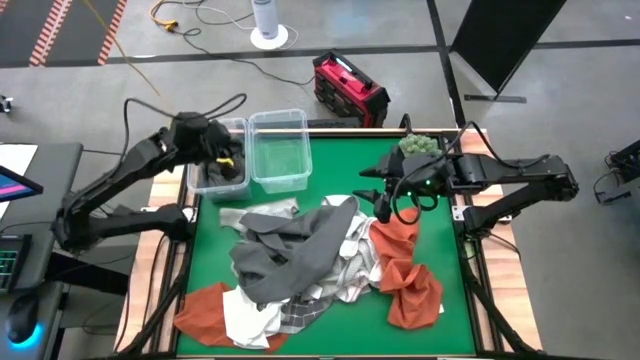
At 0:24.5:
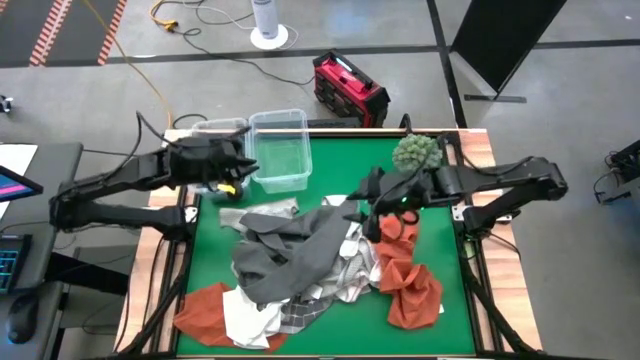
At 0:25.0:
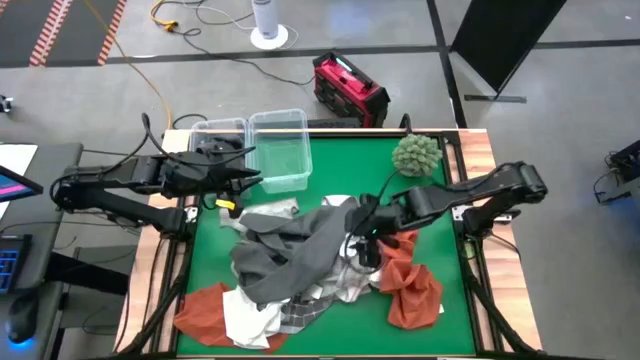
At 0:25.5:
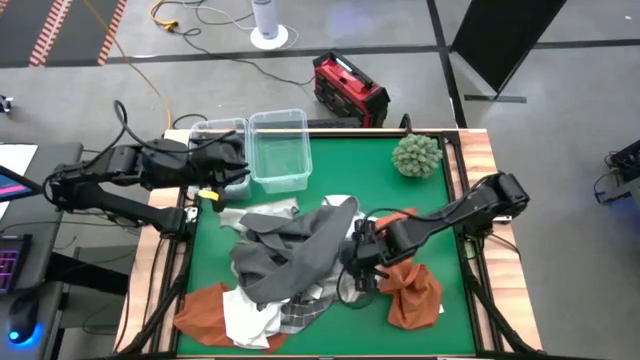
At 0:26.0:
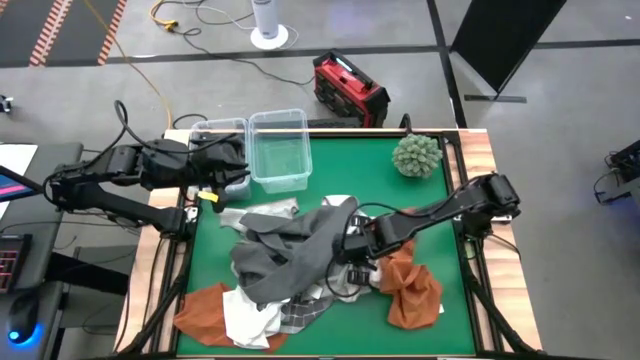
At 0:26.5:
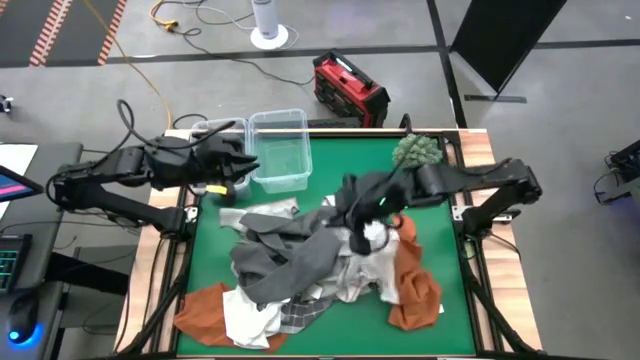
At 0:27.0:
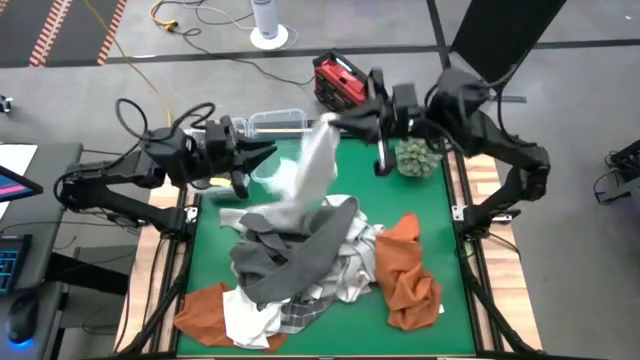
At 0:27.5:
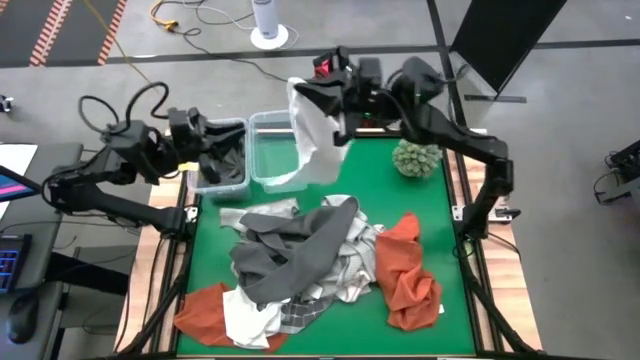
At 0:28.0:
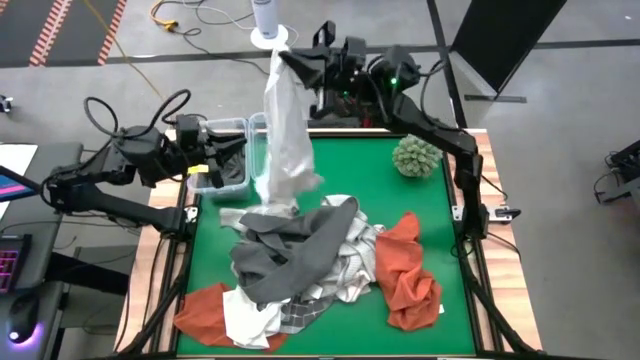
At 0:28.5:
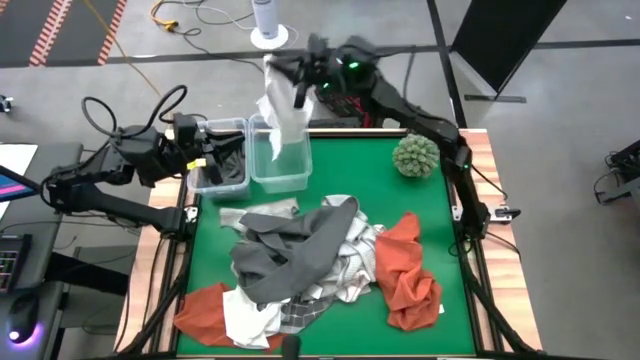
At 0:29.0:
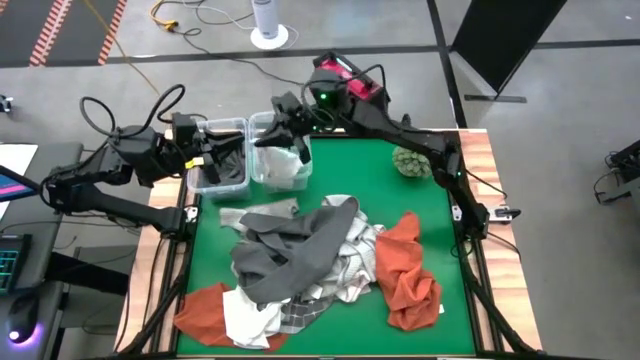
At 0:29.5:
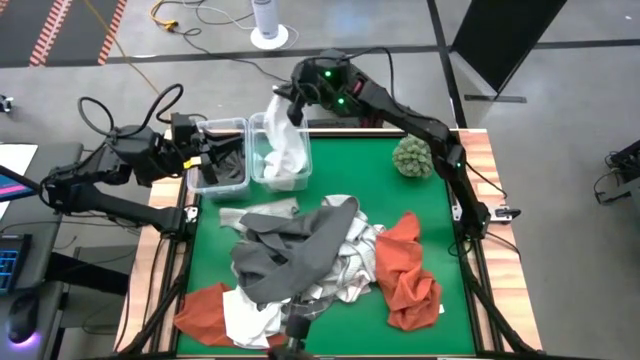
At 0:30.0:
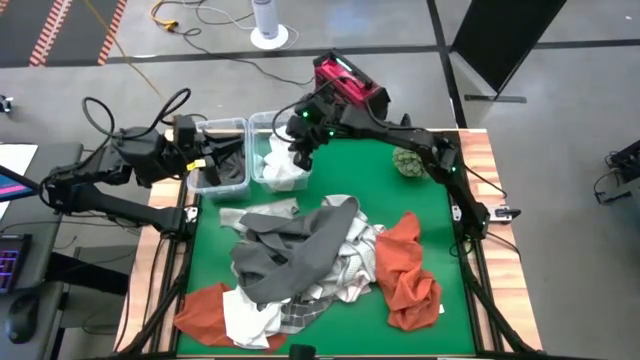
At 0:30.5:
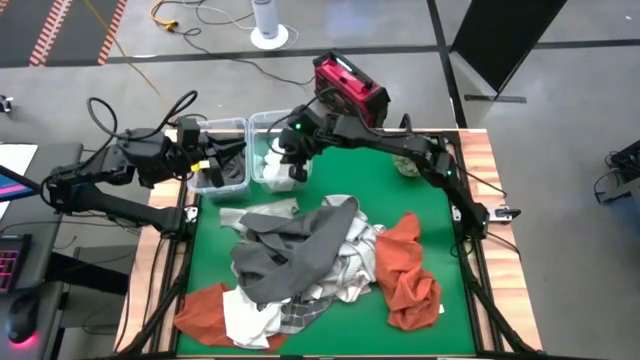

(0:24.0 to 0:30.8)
Task: Sort towels by color in basket
Put the white towel into the right transparent bin

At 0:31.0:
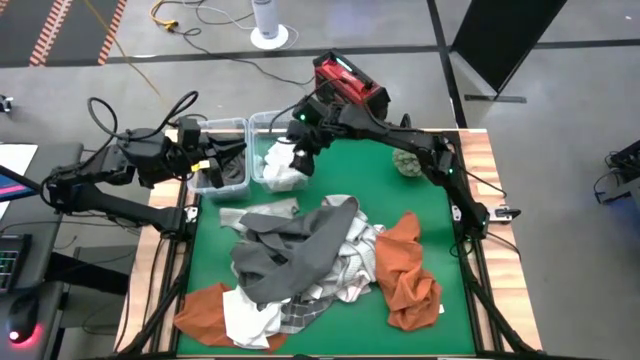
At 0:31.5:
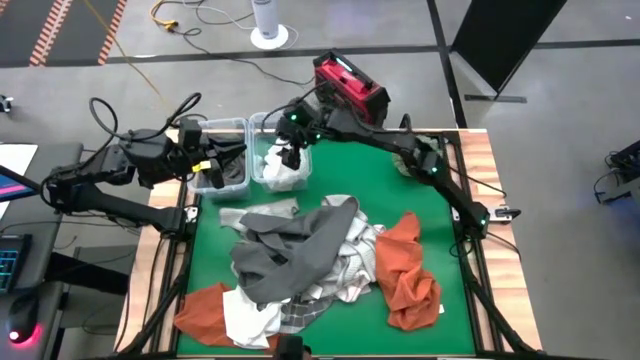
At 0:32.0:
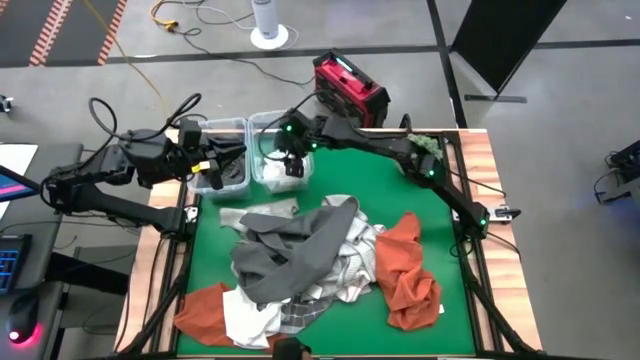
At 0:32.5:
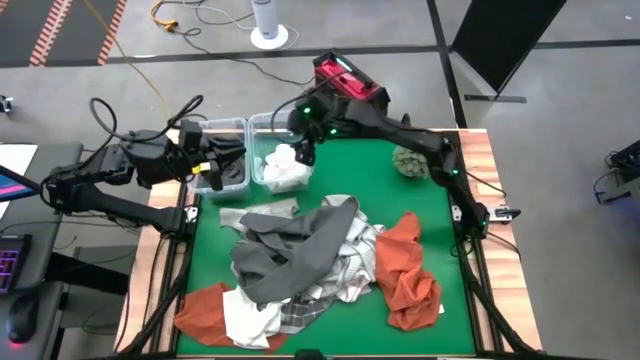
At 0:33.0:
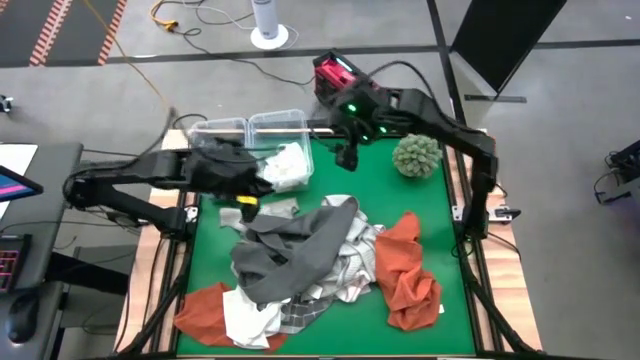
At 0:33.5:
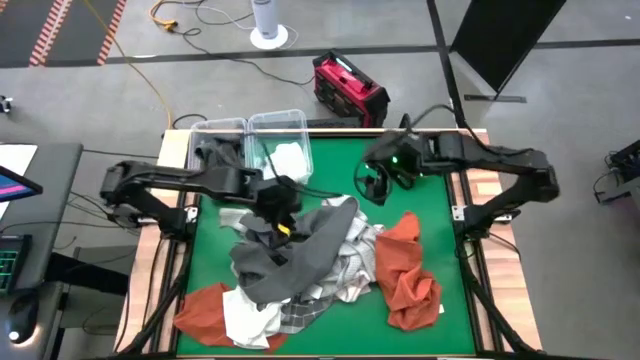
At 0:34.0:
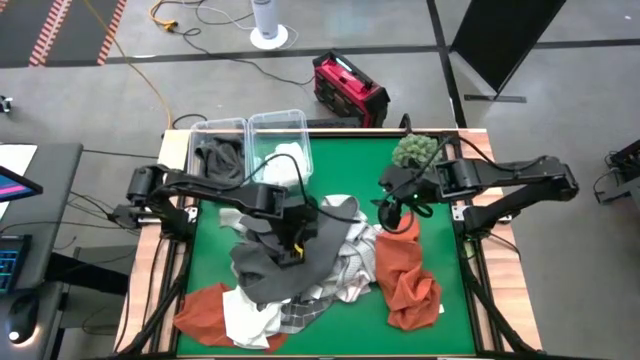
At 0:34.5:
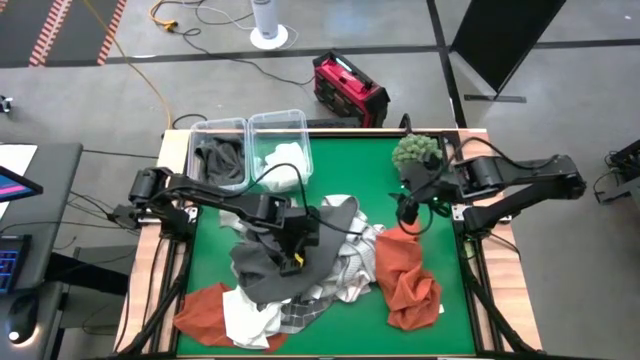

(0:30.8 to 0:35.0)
Put the gray towel into the left transparent bin

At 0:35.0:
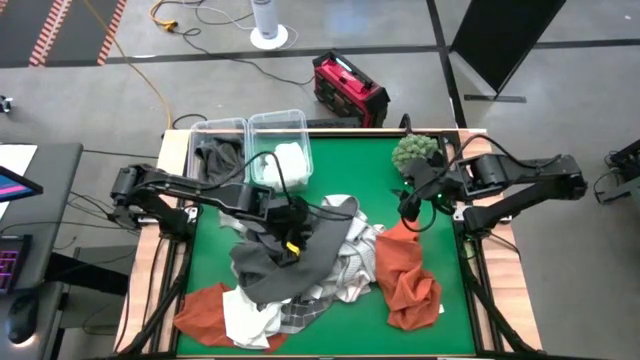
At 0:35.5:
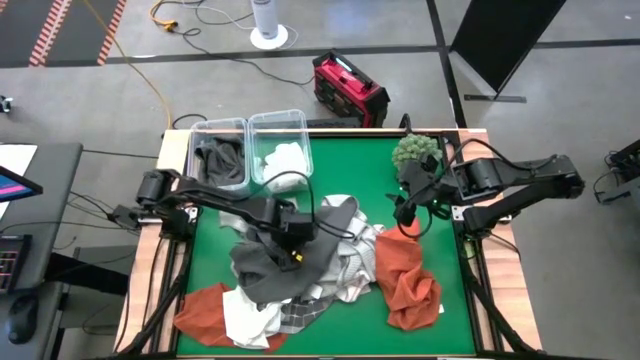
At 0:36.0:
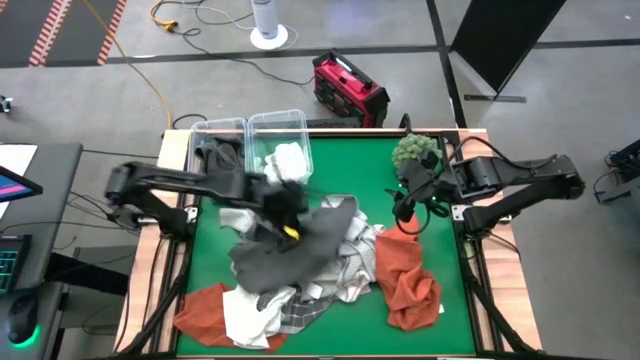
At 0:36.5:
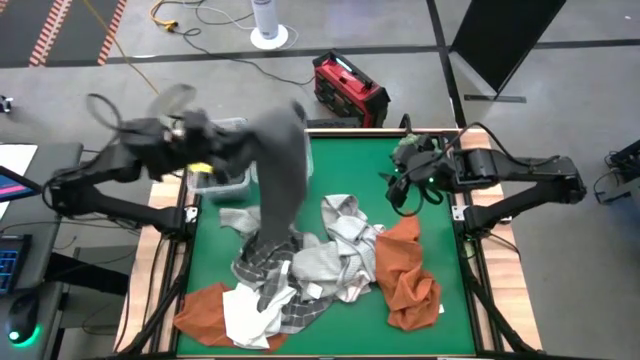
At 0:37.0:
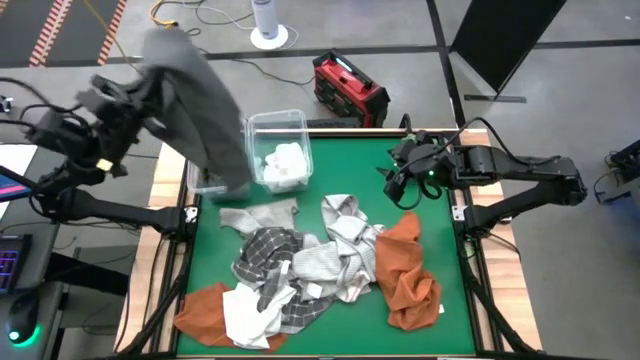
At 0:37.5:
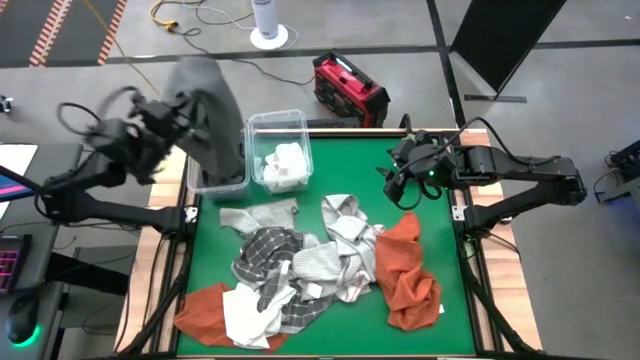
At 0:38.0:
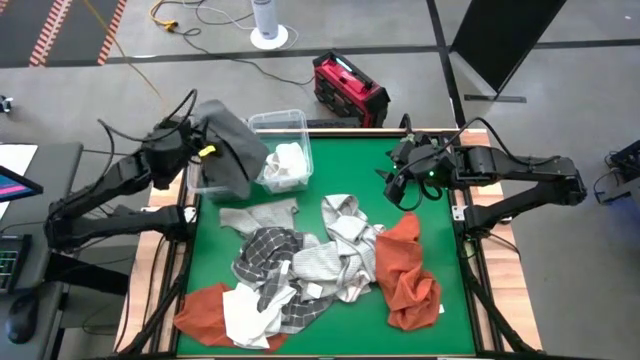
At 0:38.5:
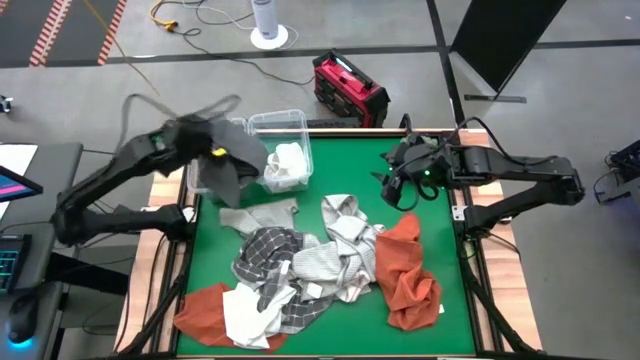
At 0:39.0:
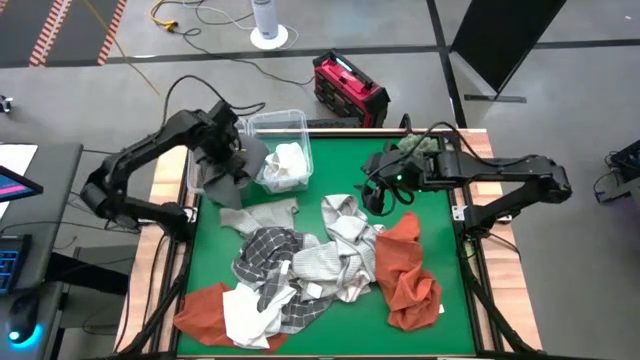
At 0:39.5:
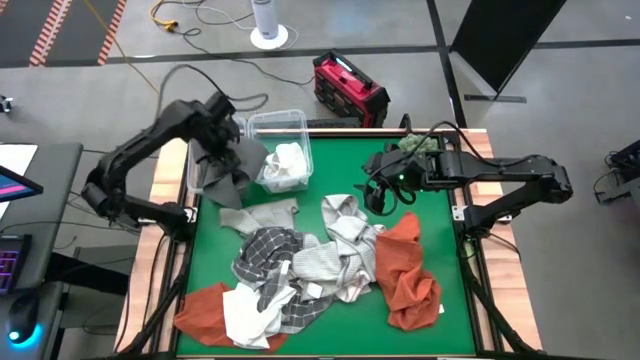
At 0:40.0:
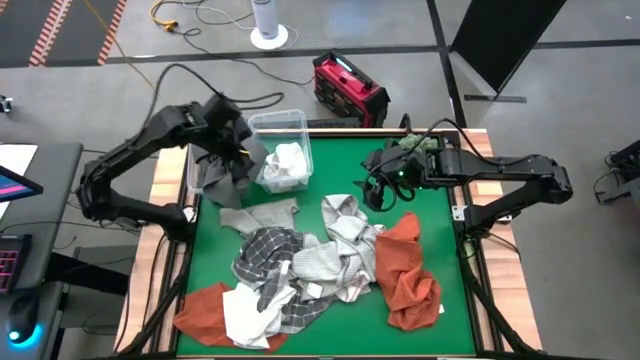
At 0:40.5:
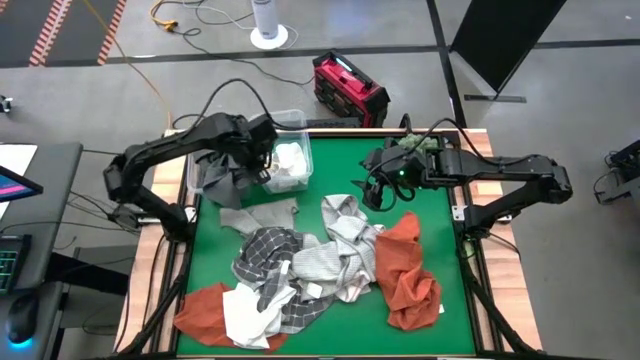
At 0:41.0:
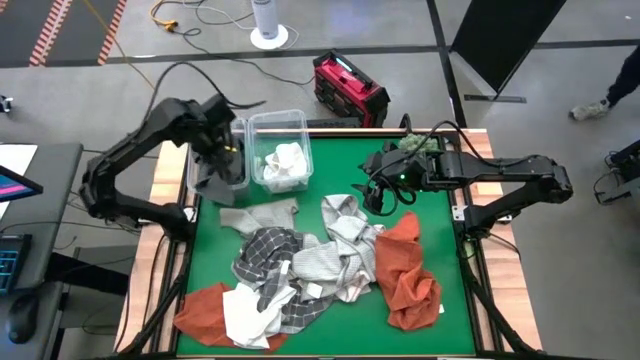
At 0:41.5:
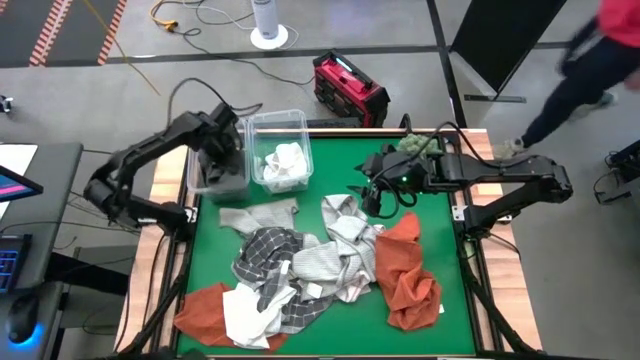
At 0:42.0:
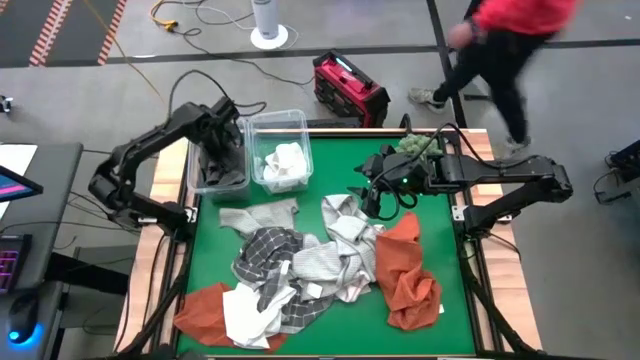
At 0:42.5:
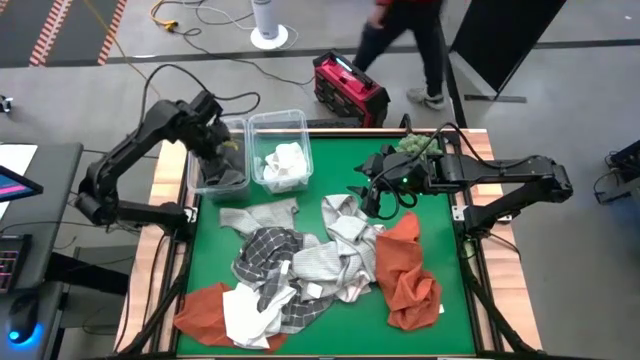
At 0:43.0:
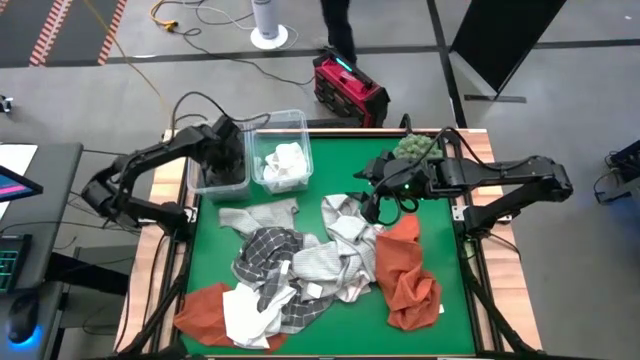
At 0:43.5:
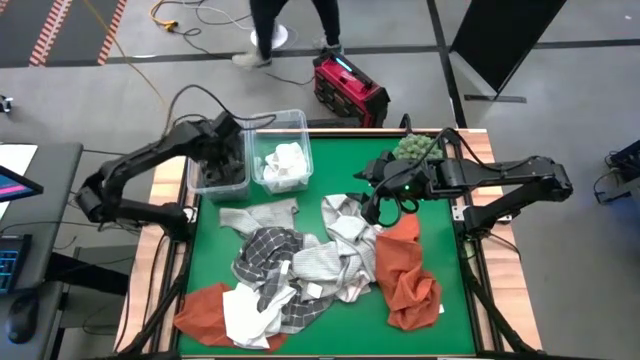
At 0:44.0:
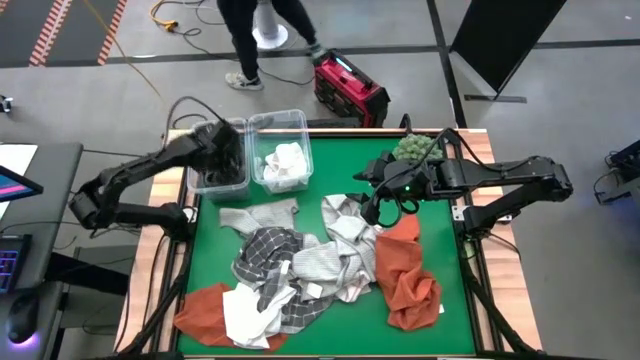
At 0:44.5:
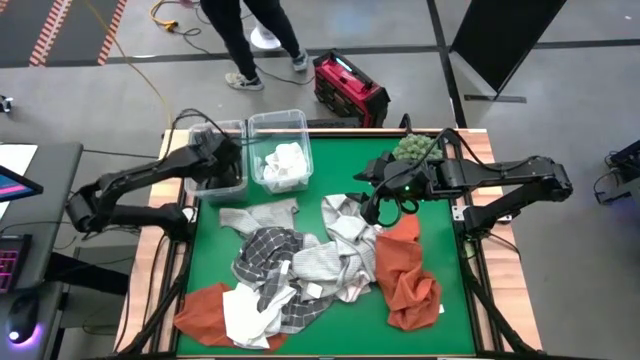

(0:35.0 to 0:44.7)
Put the gray towel into the left transparent bin
